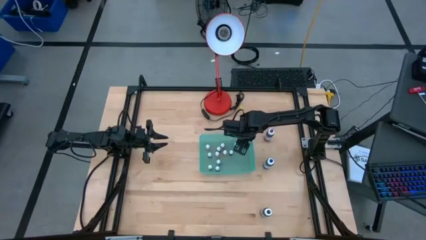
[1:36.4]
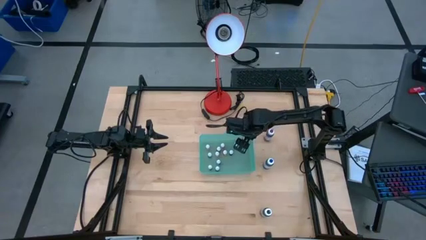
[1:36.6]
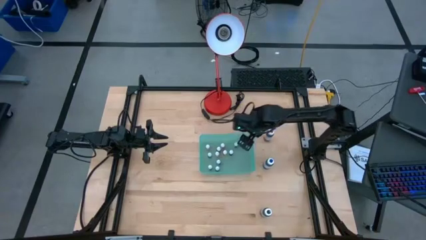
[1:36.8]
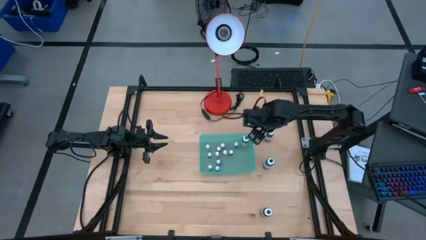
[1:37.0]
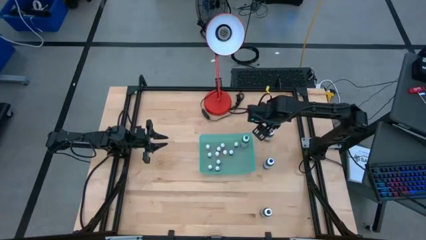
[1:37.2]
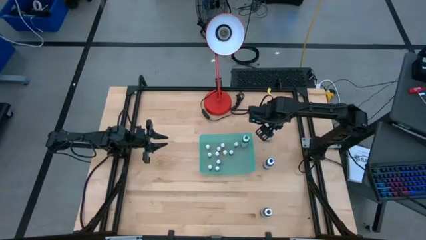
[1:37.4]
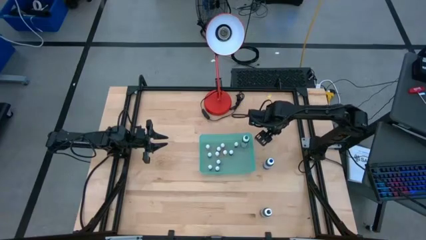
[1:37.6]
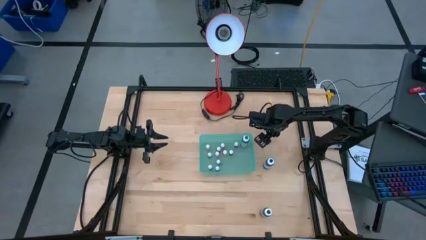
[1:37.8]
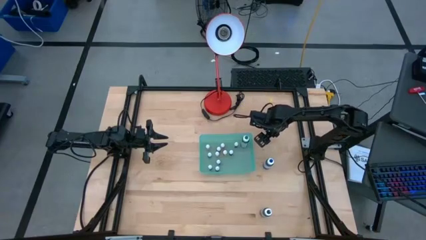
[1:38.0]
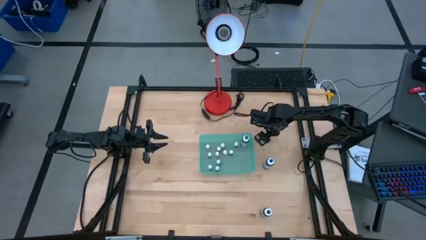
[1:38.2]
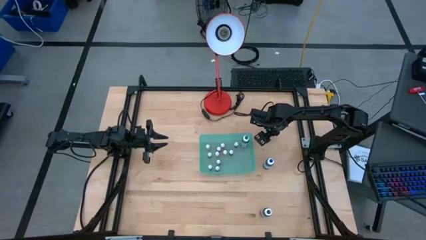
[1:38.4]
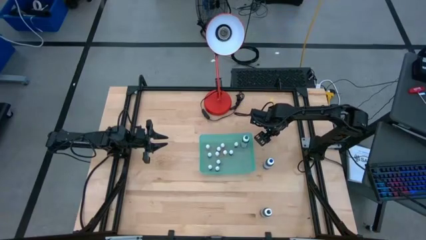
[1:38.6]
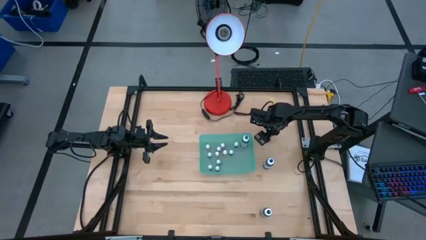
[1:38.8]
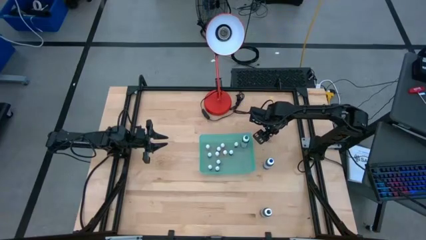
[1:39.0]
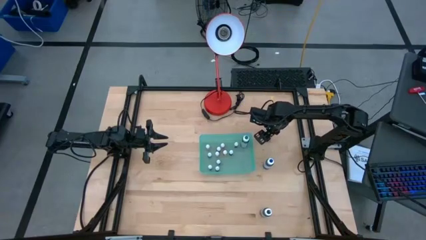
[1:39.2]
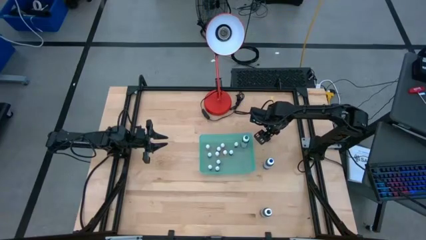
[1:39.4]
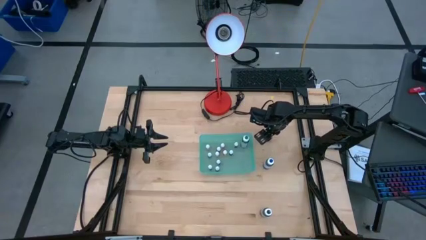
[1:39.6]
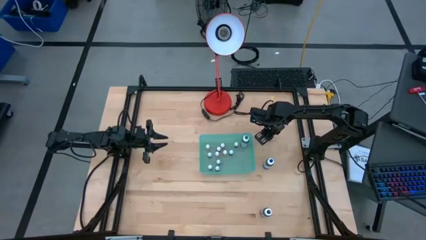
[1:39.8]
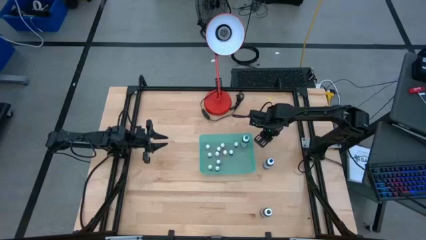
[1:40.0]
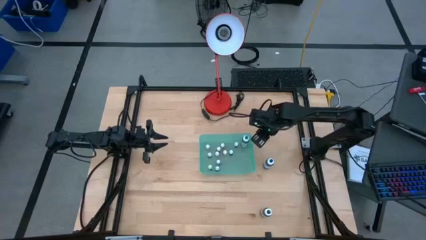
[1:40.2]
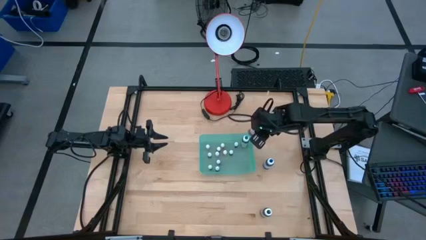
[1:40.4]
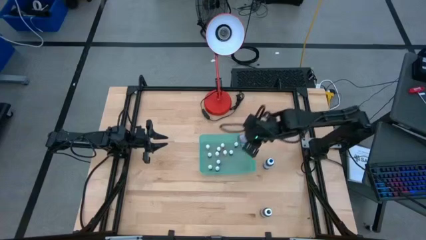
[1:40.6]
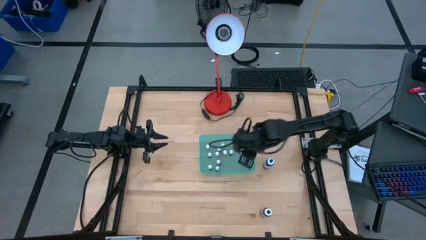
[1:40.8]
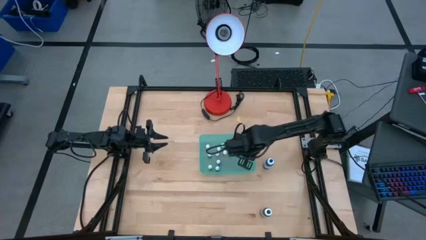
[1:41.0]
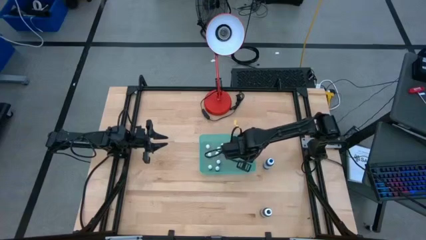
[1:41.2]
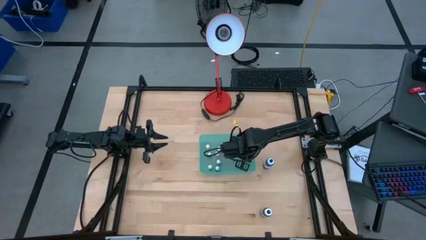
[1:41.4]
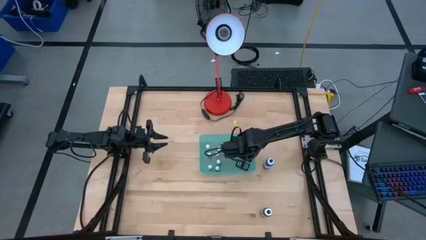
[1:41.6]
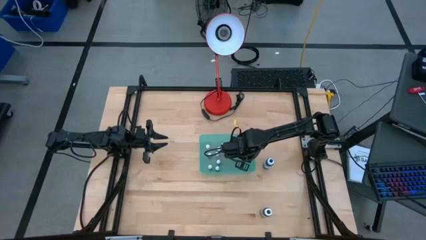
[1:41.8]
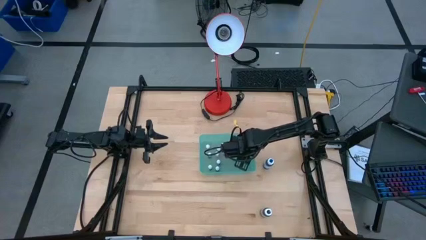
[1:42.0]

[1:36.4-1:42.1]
Task: Pick & Place food coloring
Put the big purple food coloring bottle into the green bin

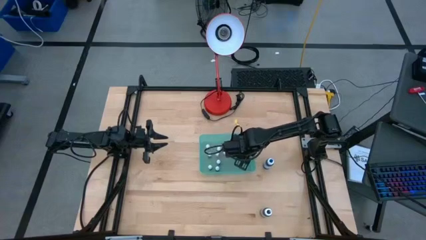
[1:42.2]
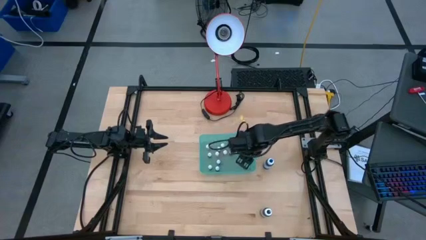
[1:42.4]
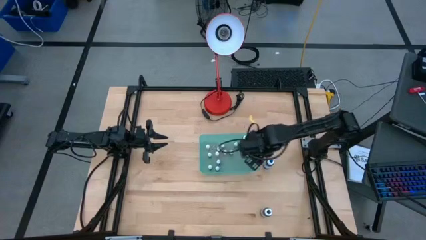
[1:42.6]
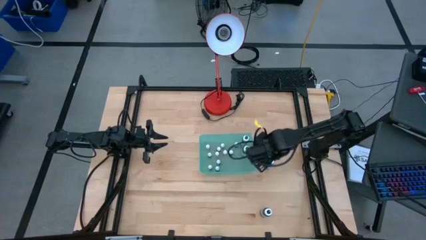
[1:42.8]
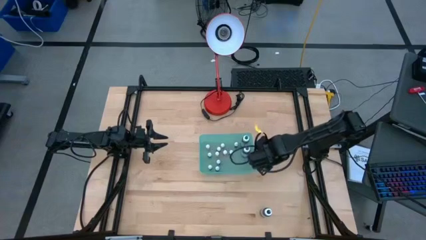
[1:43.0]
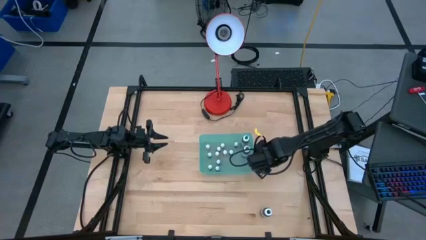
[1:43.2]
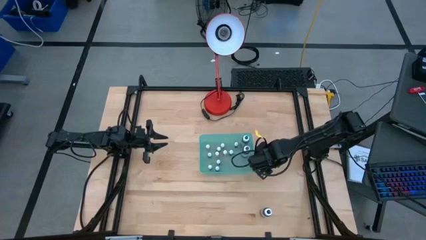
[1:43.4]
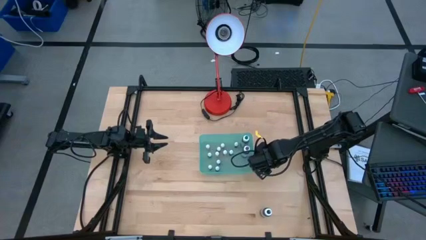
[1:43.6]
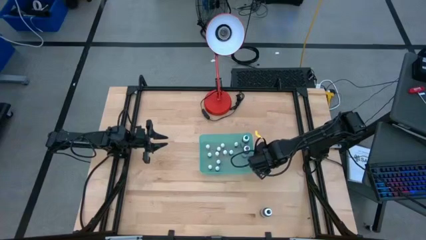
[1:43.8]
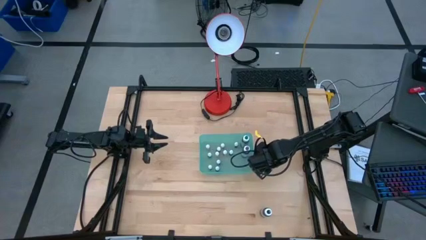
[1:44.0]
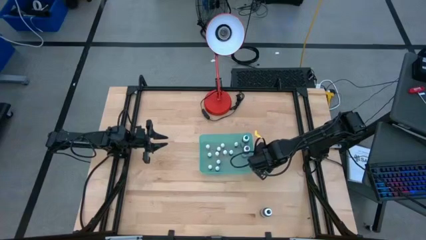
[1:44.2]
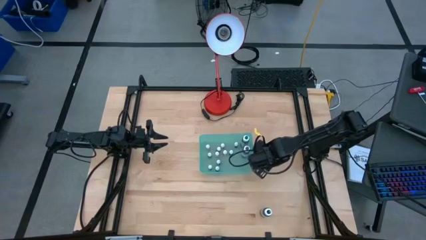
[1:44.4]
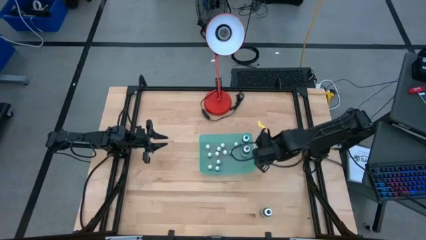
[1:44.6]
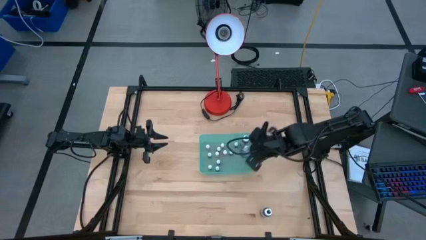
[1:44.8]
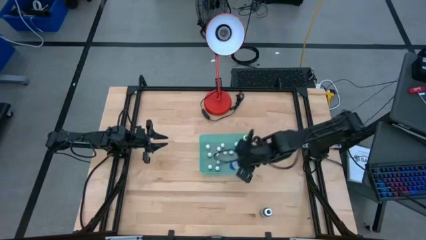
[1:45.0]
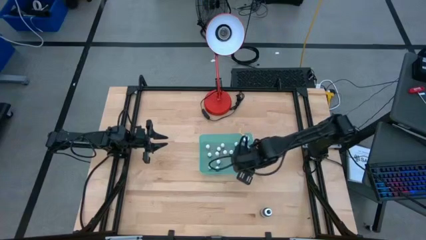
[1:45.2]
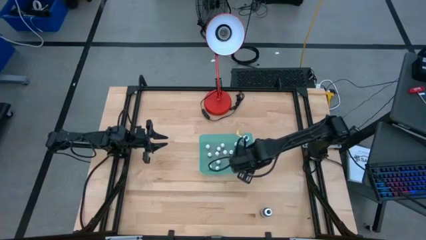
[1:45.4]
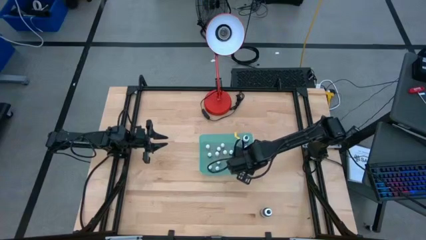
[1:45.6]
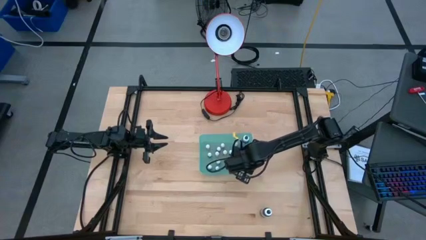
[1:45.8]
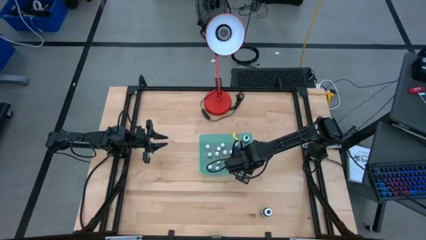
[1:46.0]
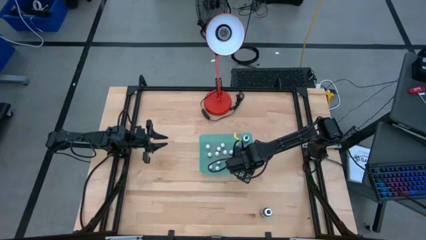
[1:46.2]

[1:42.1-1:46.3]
Put the big blue food coloring bottle into the green bin

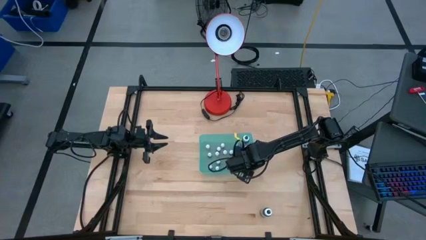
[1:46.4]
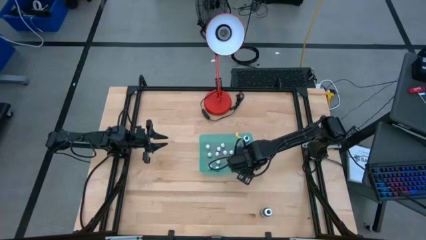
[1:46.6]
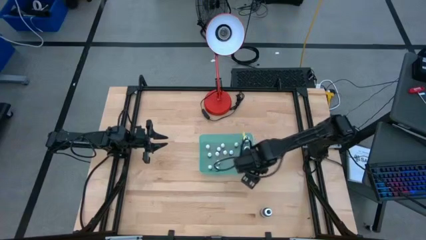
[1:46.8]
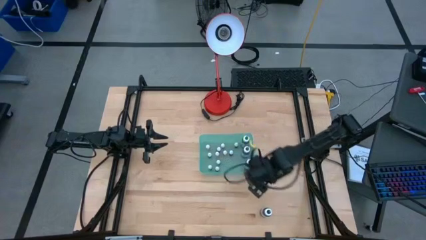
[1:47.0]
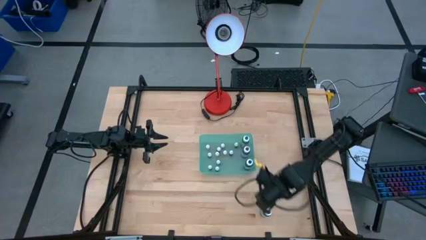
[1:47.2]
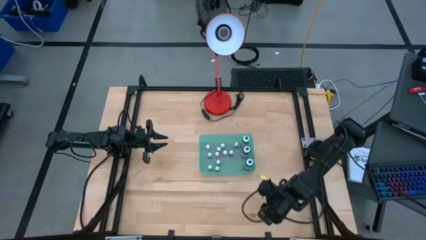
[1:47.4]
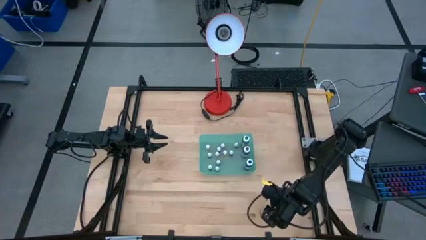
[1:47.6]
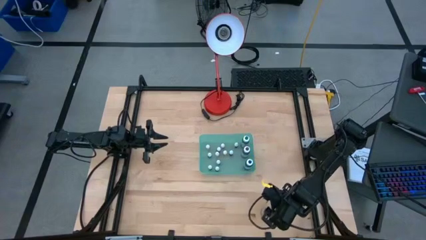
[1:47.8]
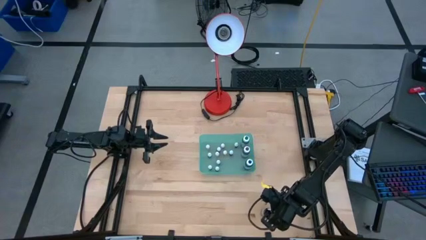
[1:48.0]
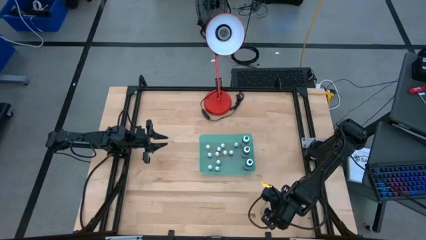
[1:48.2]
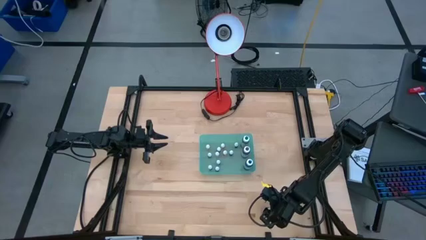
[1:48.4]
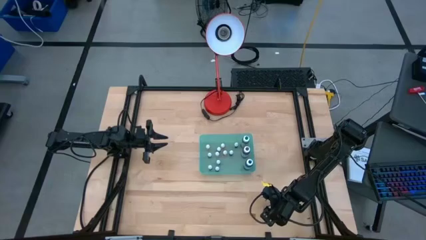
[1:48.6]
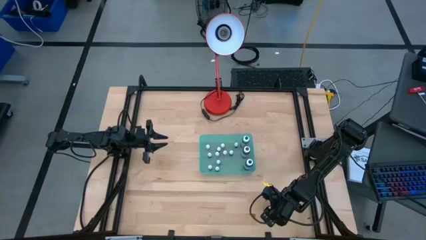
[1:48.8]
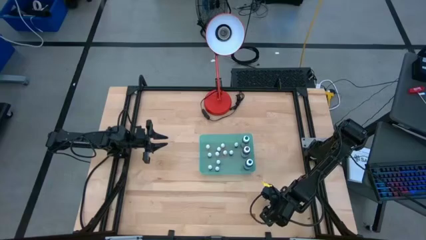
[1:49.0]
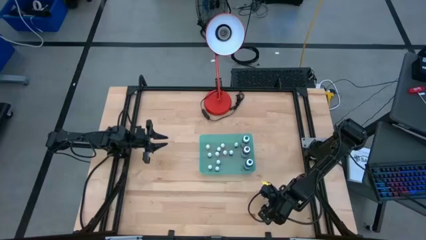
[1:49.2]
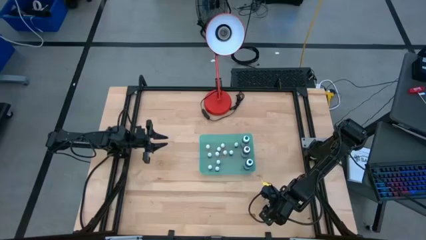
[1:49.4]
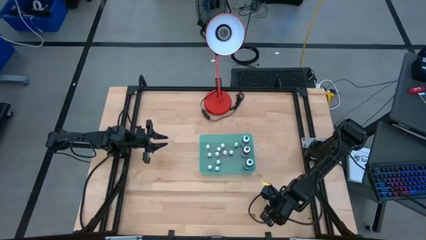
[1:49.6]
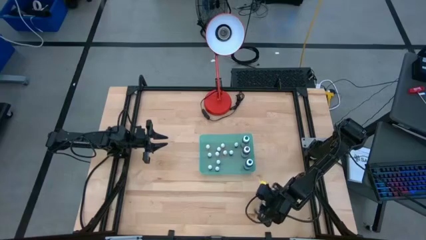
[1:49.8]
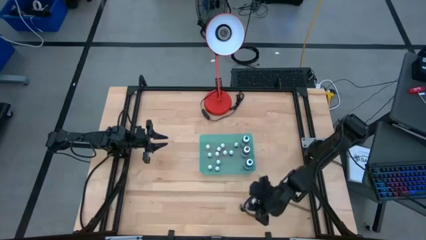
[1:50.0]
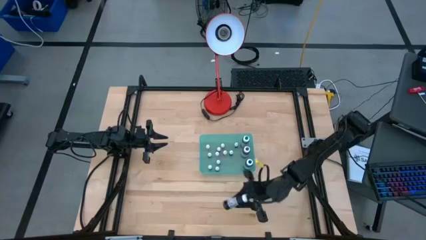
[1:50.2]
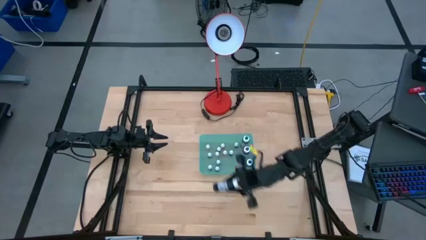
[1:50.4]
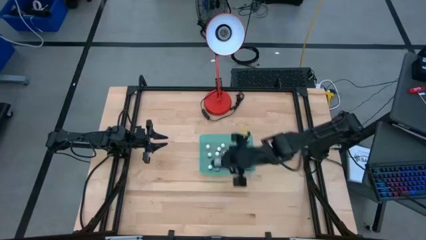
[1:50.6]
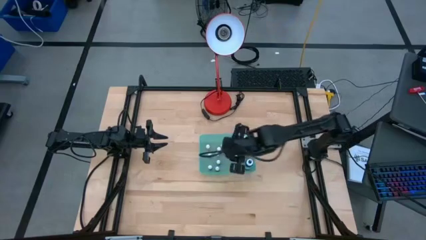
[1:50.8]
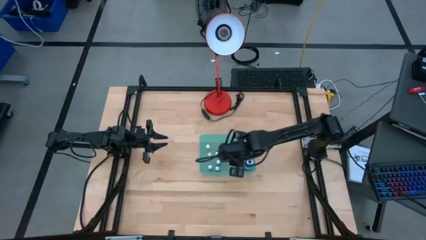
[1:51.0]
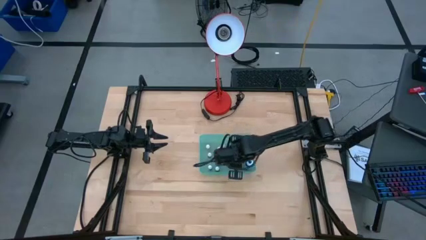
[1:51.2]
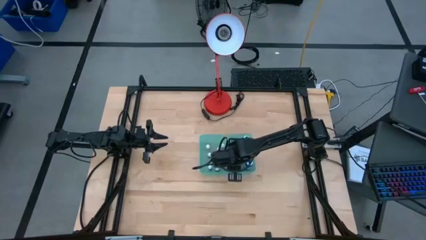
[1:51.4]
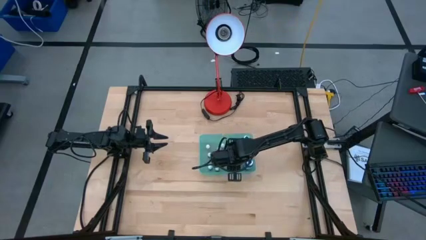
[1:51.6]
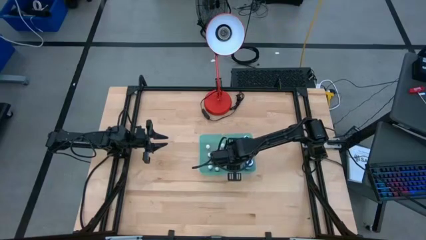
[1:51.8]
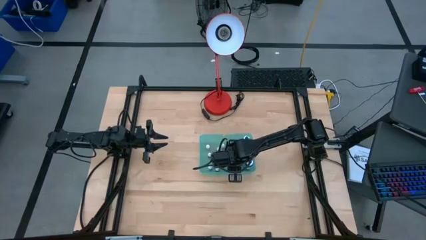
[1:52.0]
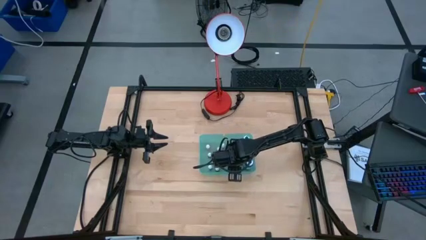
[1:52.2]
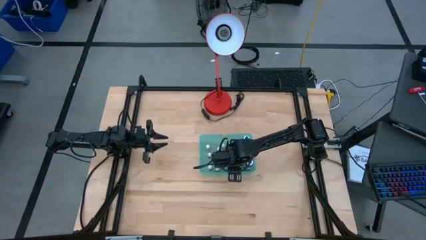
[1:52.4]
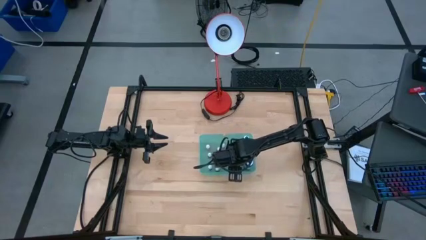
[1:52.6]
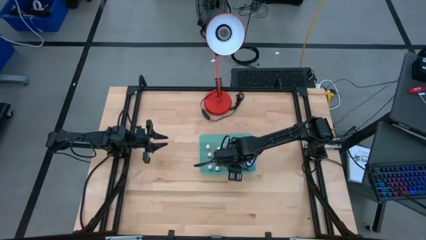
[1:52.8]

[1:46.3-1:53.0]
Put the big black food coloring bottle into the green bin
